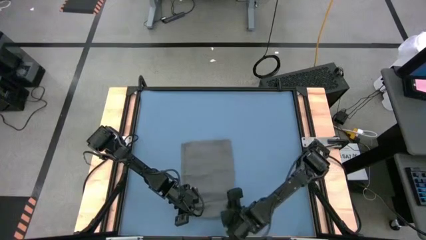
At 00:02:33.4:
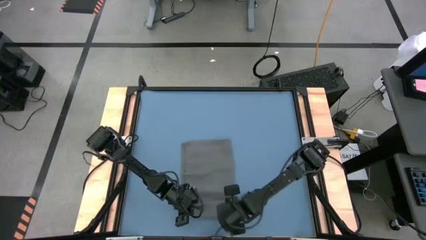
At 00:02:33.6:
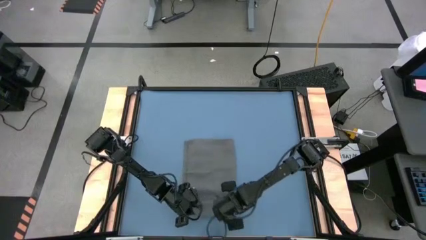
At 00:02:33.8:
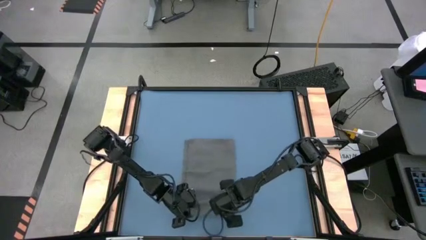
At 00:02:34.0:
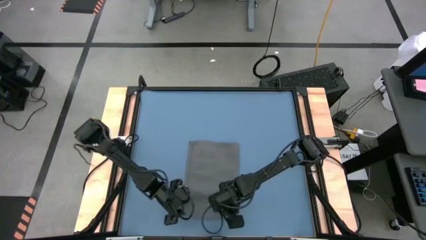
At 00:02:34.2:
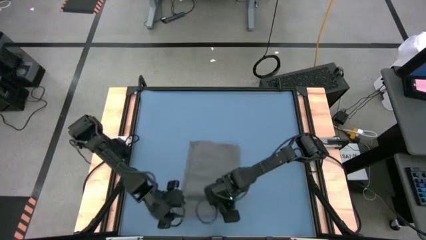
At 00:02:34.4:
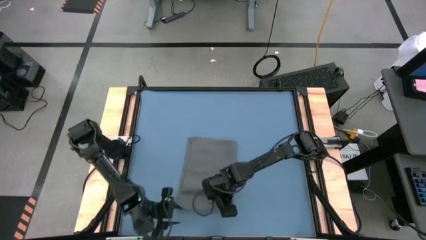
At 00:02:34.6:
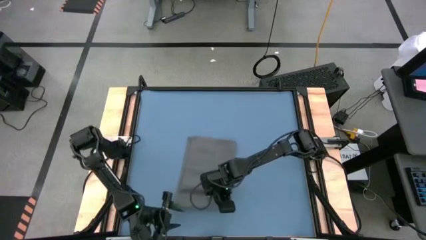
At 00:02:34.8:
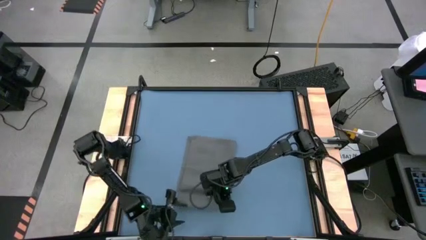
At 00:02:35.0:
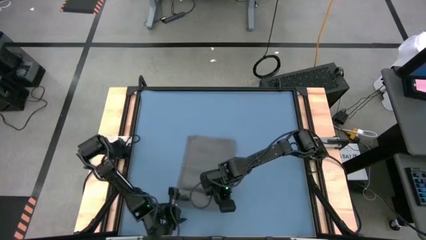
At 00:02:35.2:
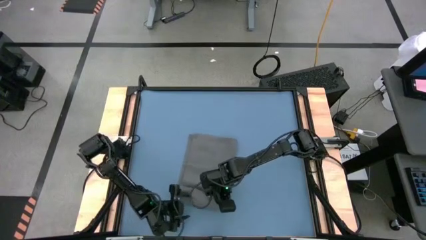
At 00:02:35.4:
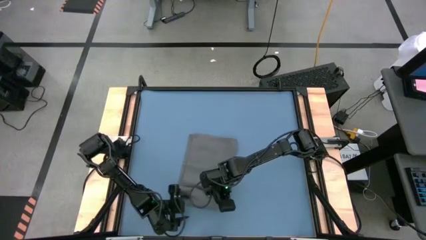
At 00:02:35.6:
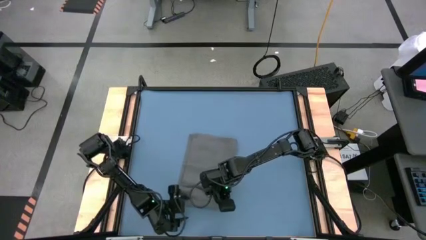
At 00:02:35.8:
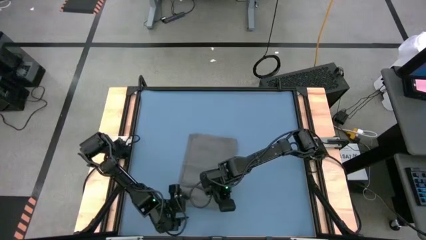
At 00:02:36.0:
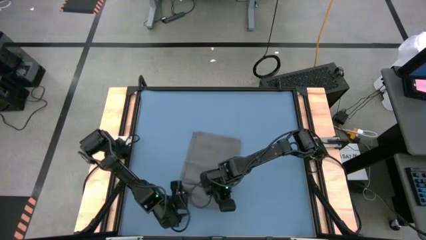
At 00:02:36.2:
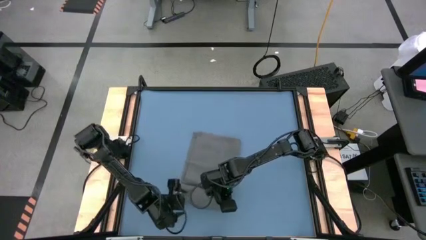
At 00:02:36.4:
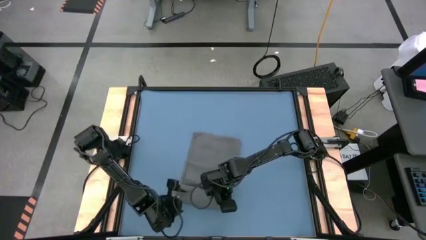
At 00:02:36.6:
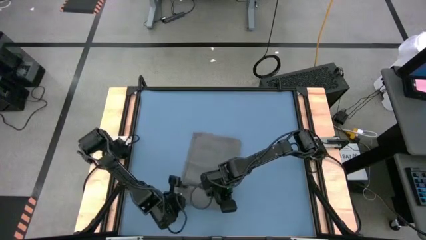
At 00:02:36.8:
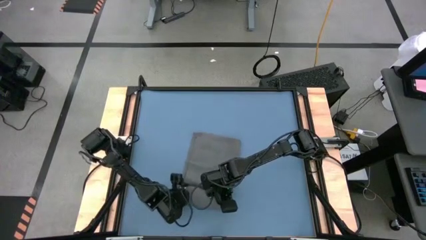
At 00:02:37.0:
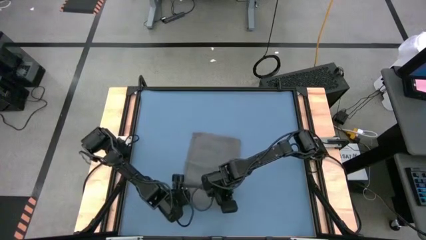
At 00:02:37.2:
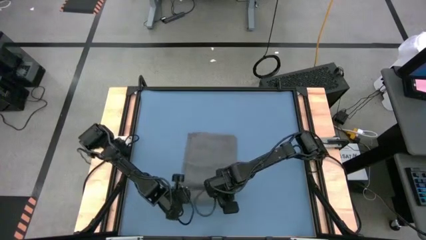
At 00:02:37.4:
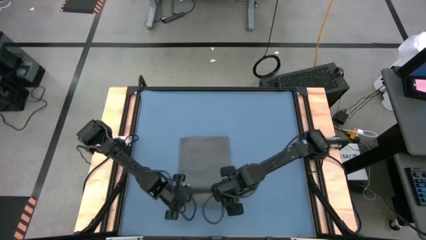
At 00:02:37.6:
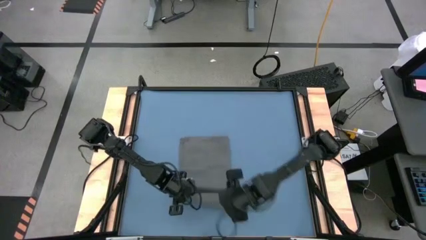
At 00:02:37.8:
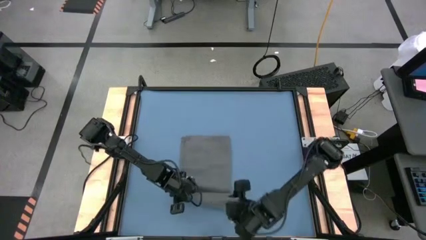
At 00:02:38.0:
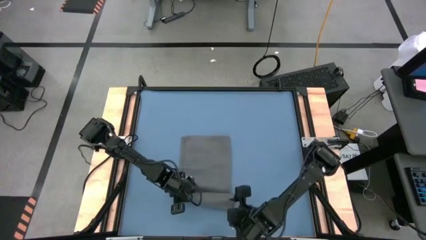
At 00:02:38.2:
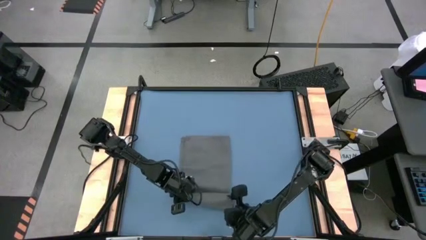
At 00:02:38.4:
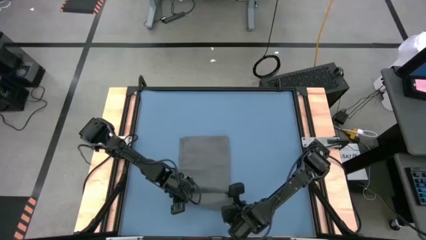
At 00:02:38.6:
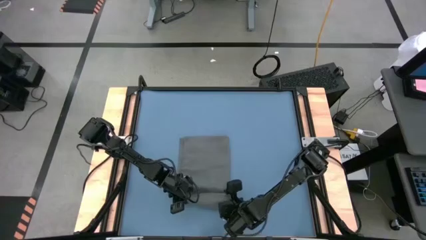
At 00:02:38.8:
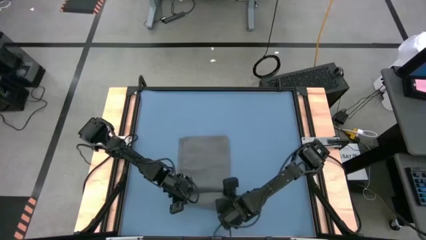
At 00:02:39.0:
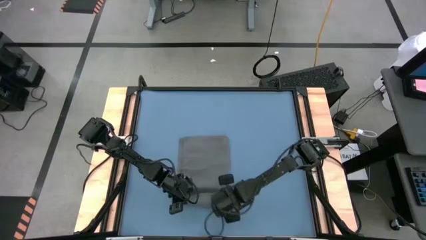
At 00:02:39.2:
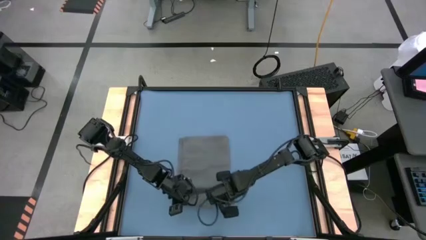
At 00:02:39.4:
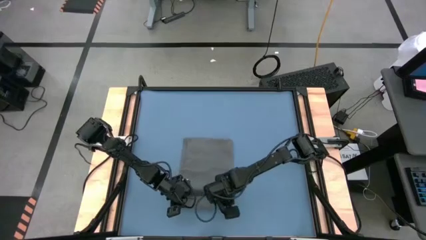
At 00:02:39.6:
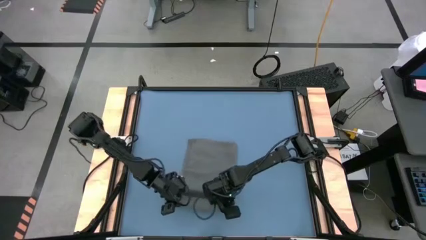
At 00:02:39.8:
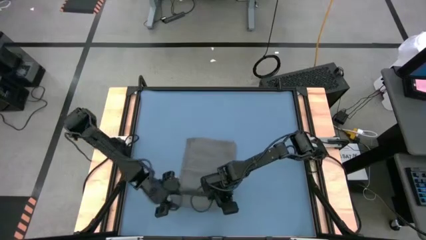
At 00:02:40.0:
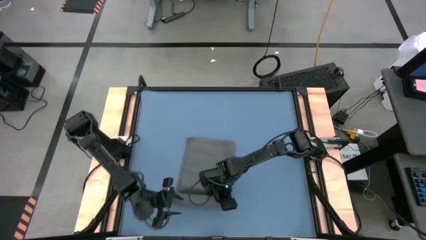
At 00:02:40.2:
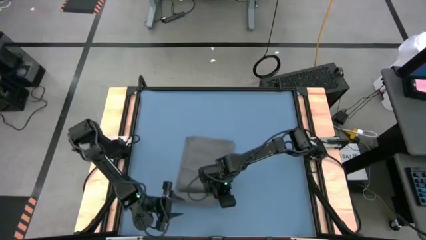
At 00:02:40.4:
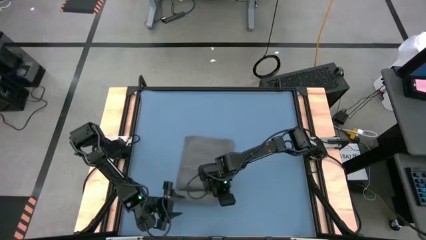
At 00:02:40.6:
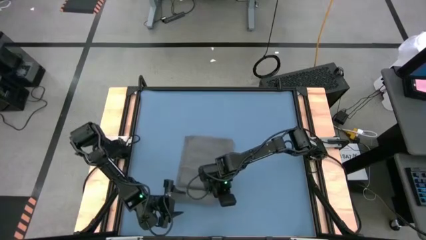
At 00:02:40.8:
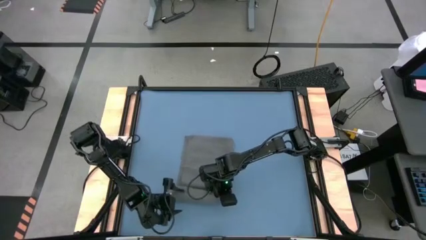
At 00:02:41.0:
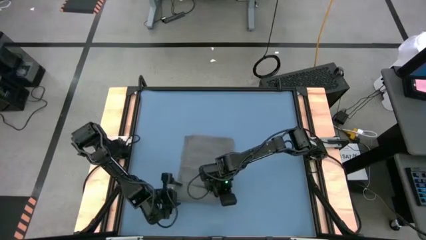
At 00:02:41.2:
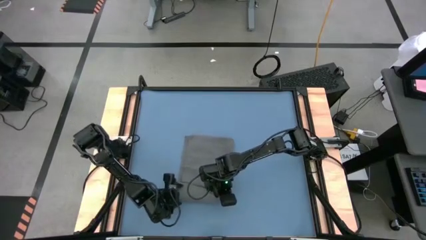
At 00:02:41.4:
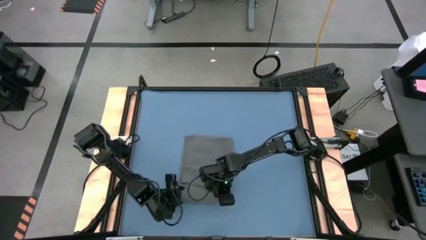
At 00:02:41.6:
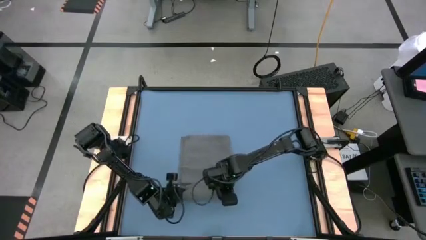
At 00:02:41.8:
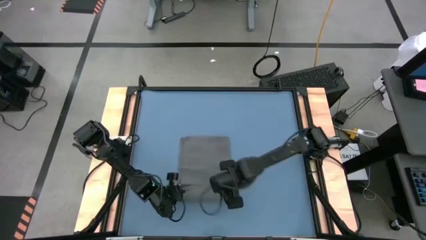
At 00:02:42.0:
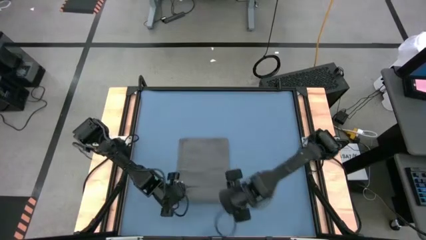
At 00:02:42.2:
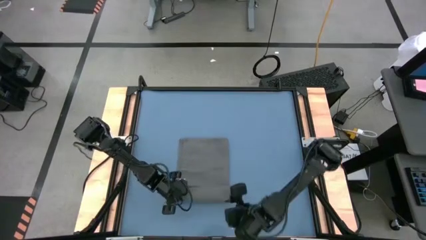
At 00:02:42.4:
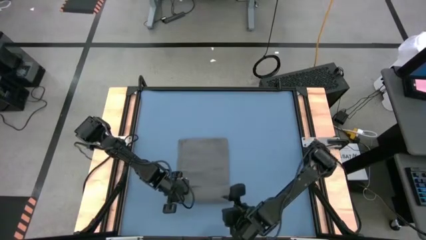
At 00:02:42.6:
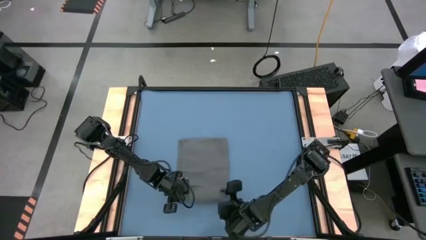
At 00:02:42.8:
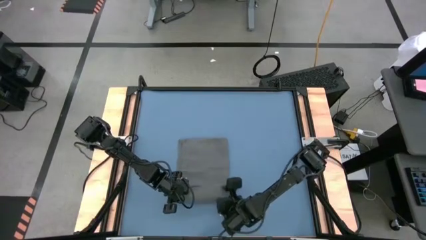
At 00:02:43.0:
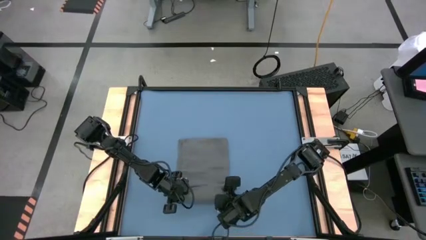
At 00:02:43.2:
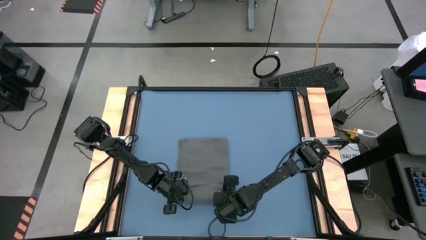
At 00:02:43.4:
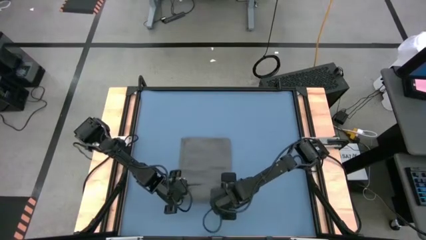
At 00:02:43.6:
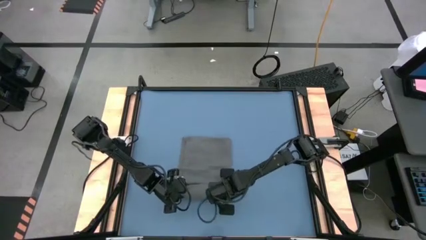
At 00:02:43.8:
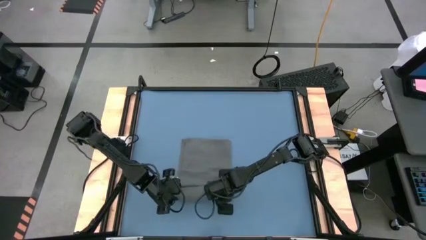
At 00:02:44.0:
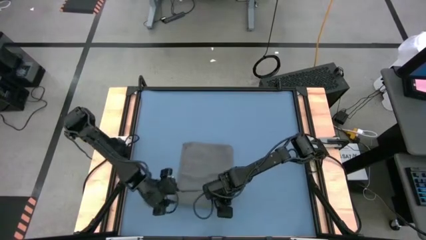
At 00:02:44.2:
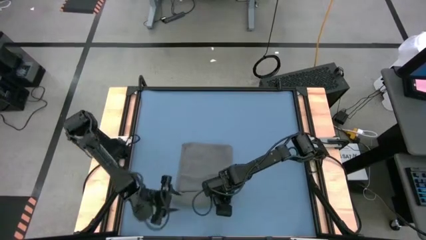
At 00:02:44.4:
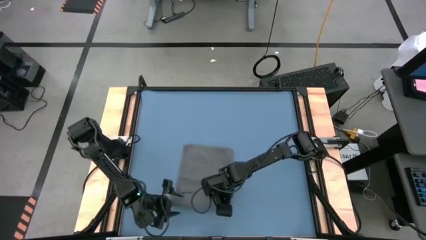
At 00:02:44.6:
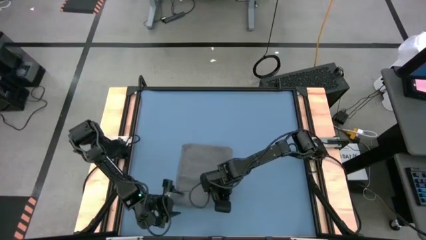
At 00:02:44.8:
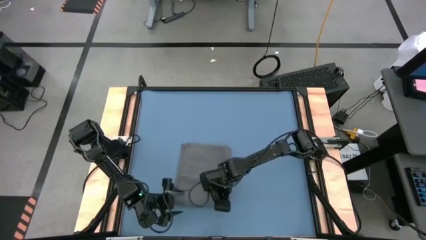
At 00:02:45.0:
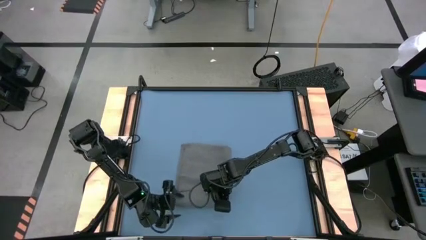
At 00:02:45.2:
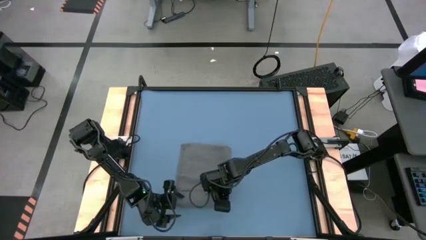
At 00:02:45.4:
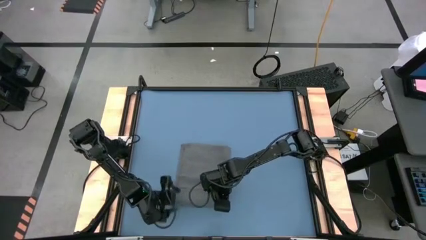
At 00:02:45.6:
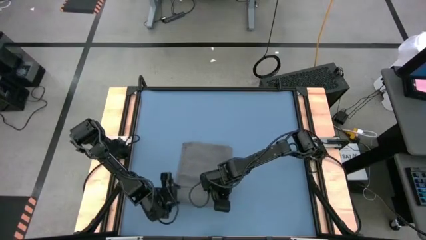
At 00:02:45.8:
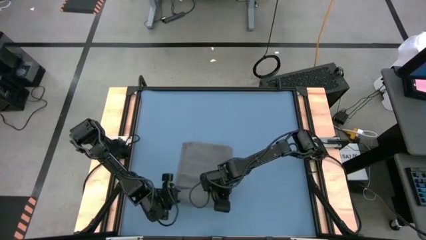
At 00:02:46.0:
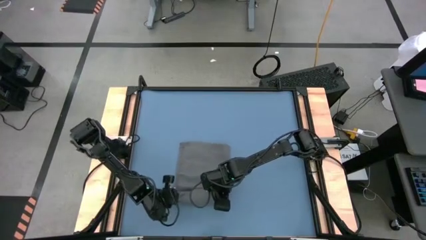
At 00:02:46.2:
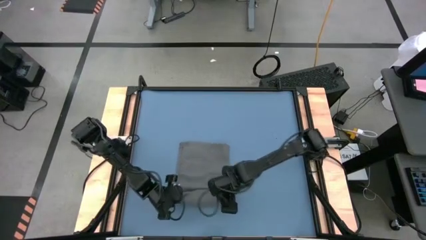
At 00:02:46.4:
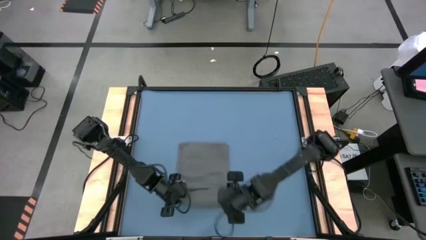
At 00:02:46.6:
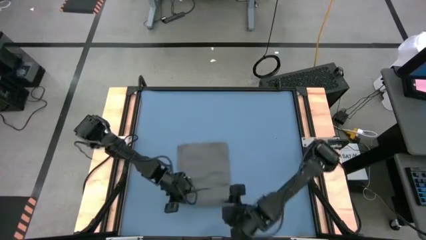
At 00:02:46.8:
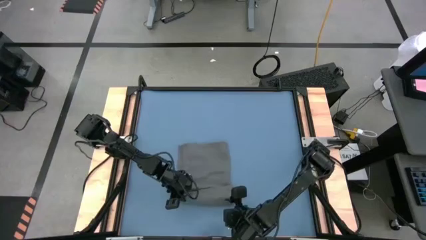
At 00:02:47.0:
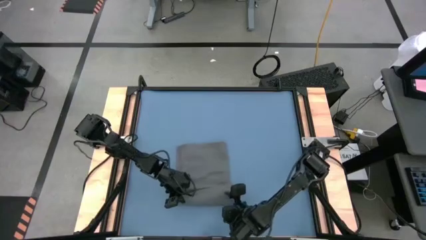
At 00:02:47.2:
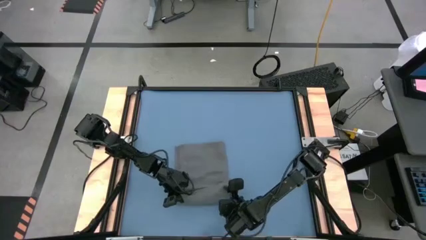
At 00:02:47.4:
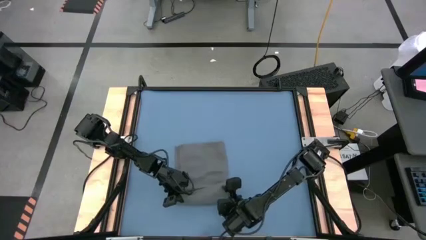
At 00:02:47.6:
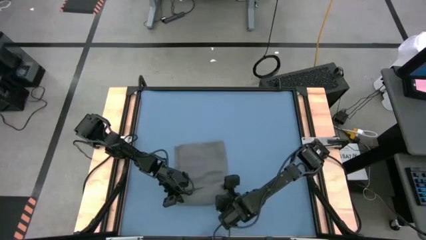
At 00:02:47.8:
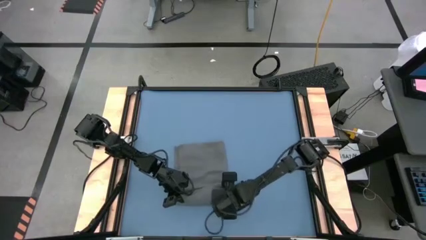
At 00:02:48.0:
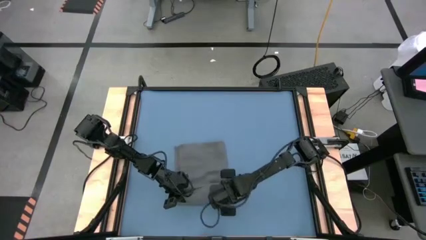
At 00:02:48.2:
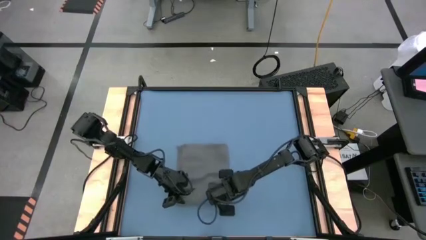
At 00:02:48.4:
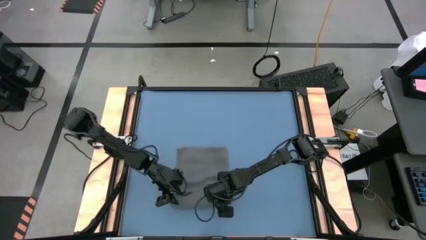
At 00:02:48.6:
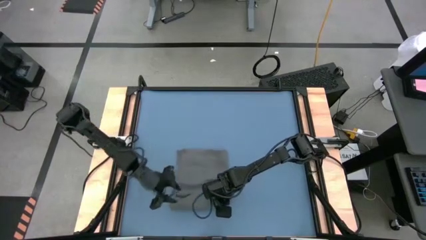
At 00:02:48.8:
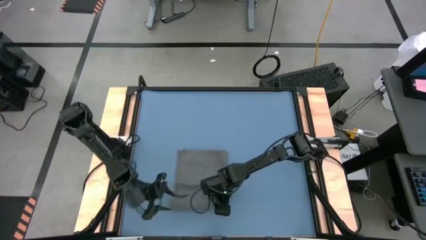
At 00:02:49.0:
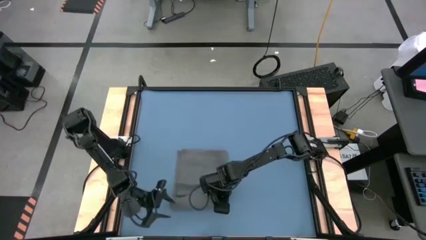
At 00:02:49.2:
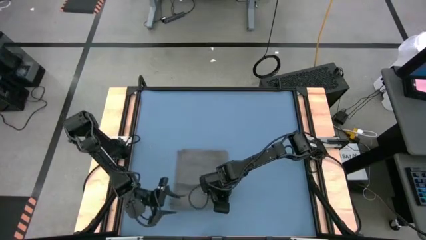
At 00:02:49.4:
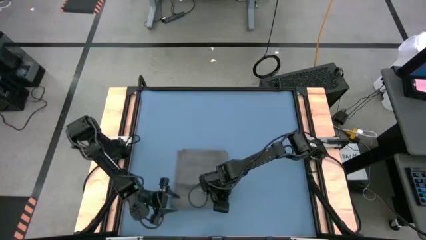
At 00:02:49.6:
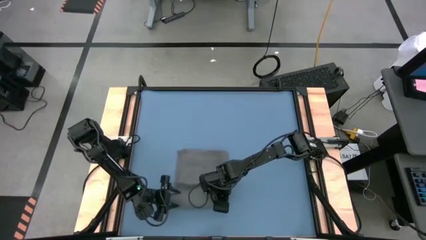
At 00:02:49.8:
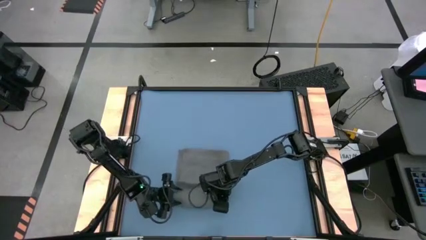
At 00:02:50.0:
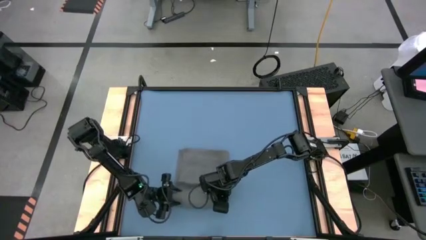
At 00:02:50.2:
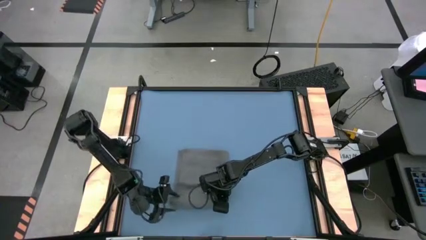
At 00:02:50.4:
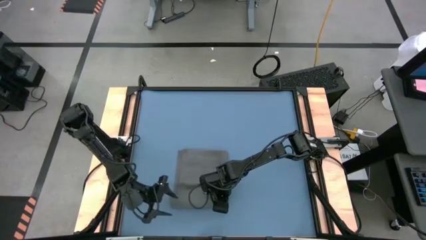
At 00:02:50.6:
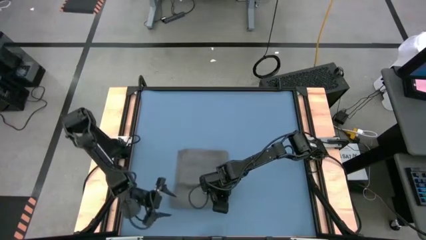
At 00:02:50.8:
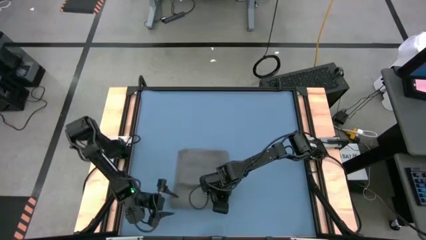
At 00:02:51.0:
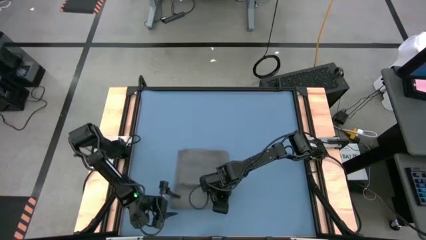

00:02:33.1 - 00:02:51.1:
Task: Roll towel
Roll the gray towel
